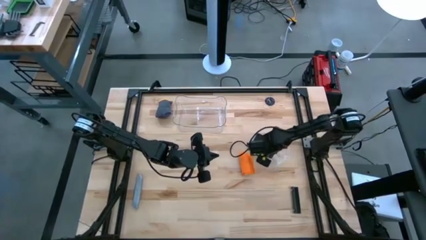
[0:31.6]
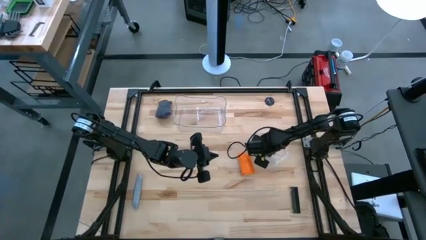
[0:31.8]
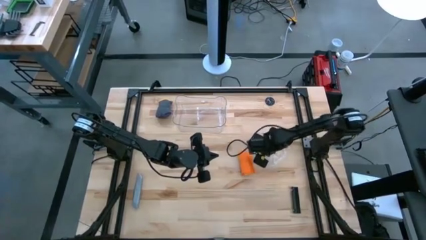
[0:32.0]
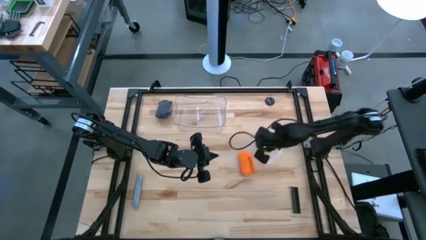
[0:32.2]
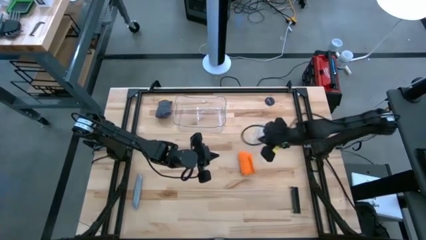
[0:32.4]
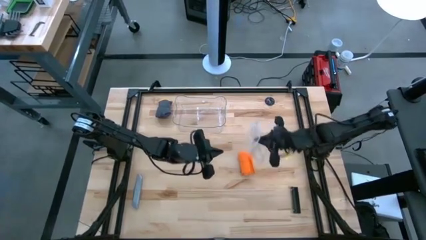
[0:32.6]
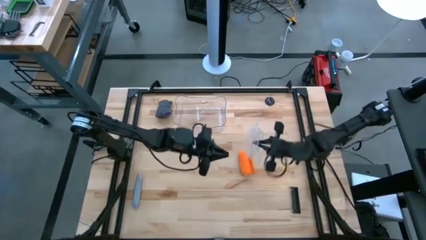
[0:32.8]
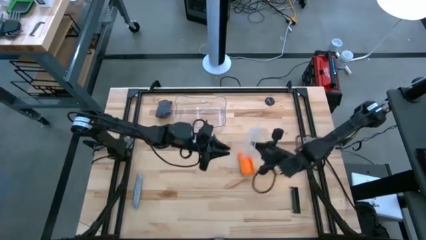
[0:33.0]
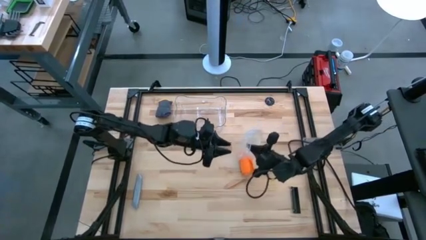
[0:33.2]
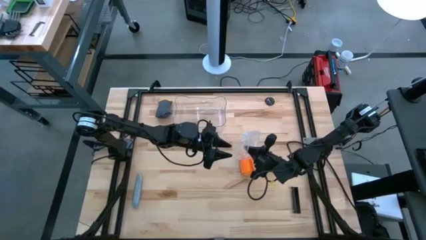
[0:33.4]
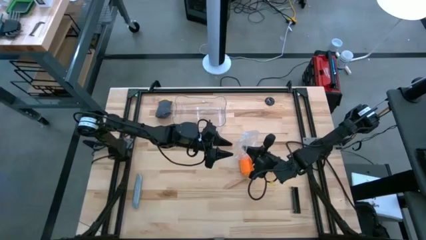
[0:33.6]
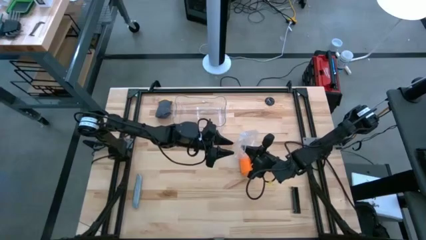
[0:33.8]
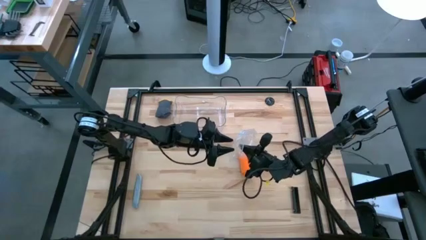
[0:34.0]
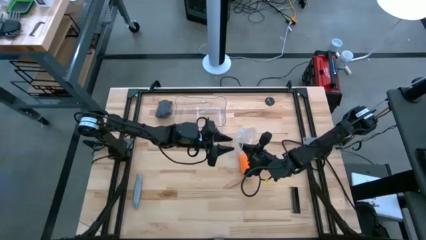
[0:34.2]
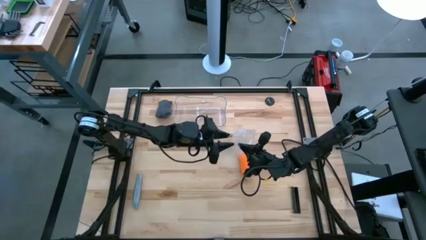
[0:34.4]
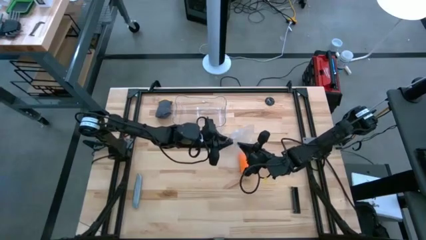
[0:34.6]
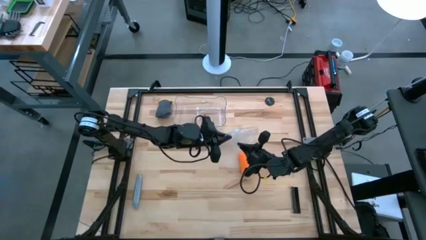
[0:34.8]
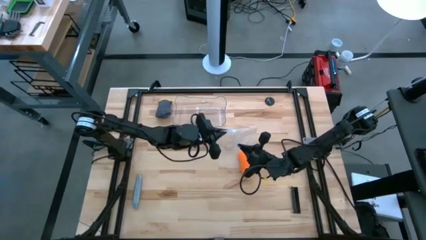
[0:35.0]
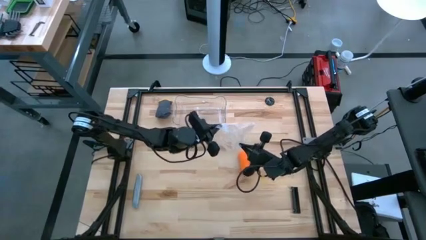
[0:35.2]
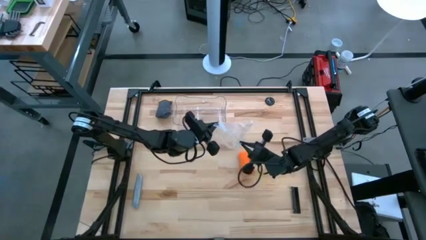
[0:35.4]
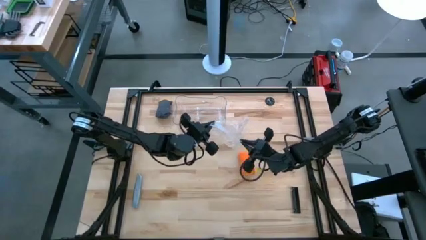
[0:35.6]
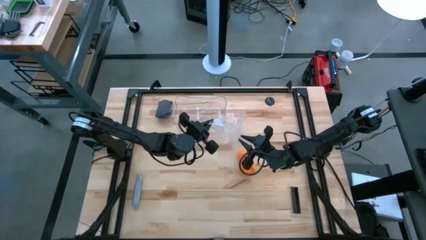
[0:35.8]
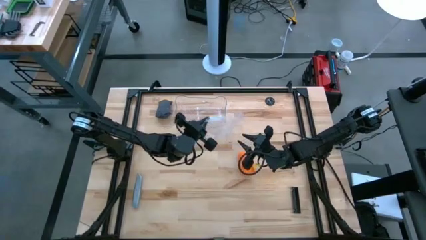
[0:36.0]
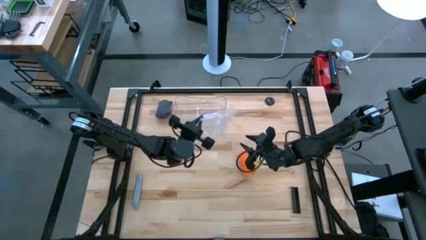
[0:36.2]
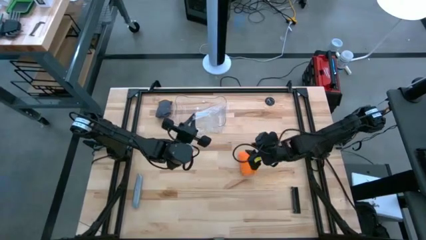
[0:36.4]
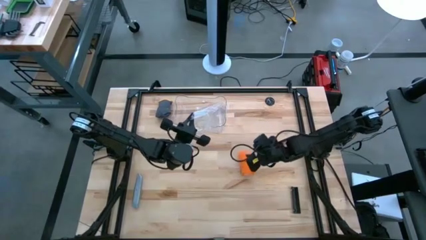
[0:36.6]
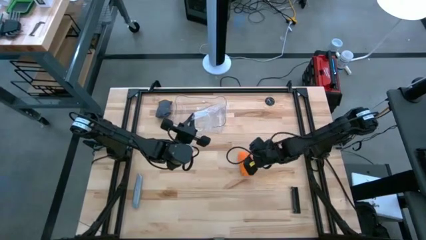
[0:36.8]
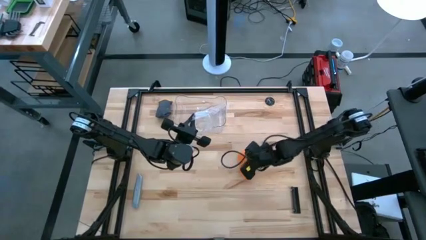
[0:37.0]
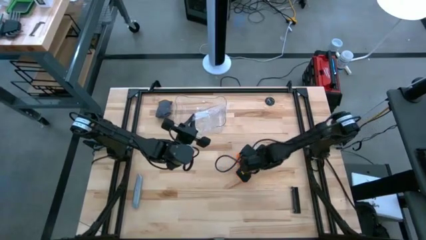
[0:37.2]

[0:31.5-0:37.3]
Task: Roll bandage
Put the orange bandage into the transparent zip bag

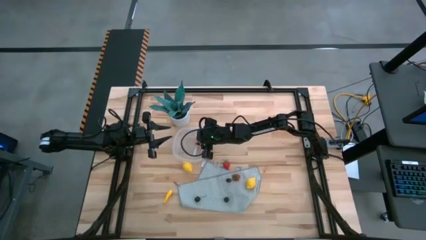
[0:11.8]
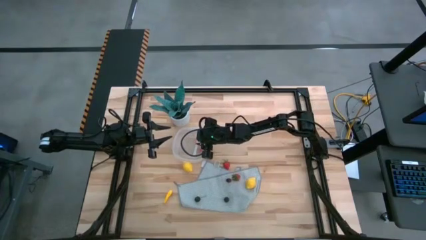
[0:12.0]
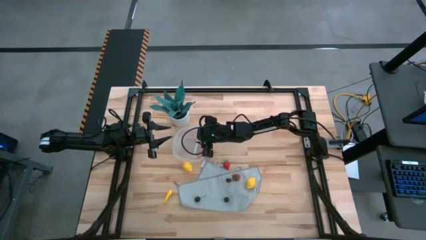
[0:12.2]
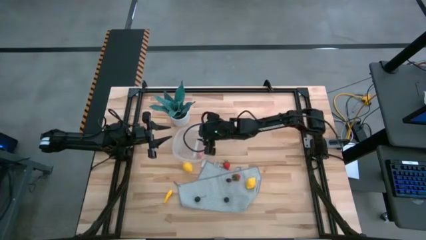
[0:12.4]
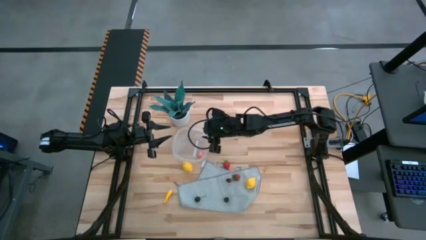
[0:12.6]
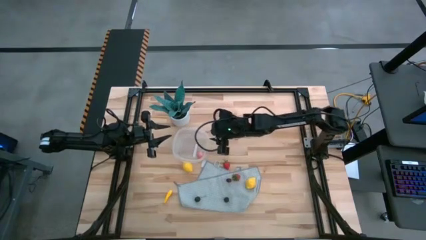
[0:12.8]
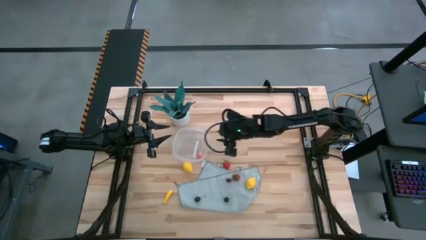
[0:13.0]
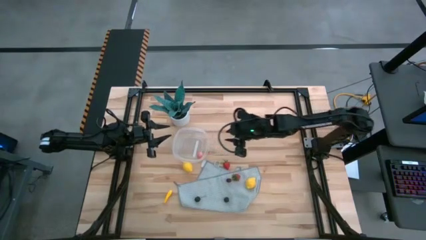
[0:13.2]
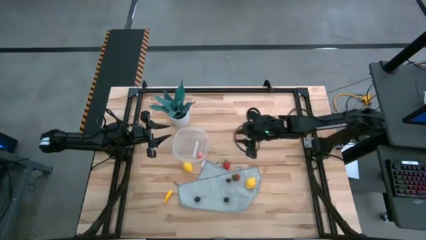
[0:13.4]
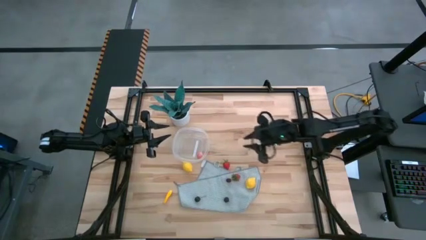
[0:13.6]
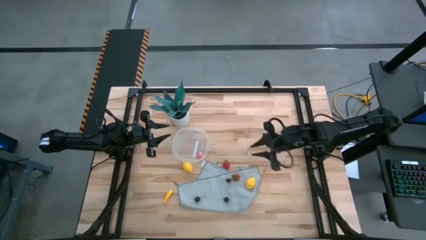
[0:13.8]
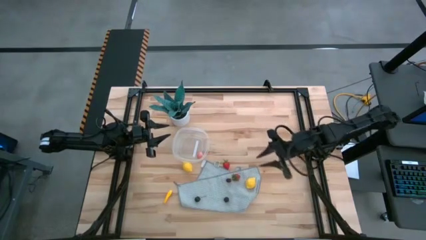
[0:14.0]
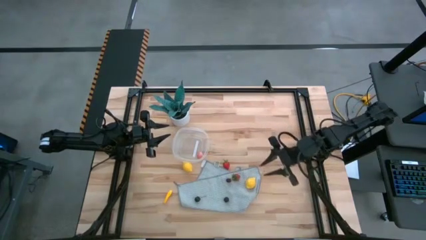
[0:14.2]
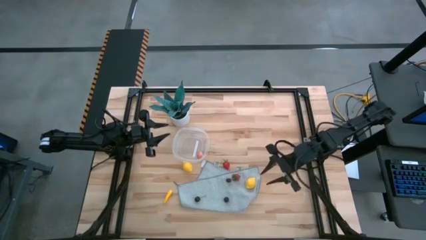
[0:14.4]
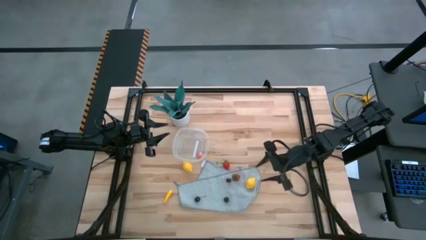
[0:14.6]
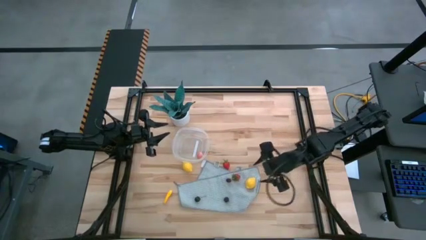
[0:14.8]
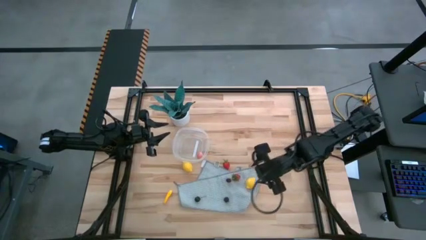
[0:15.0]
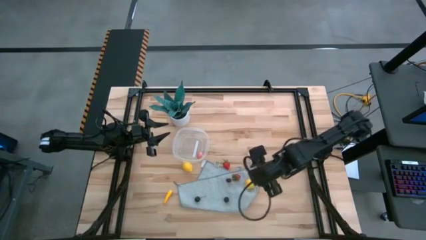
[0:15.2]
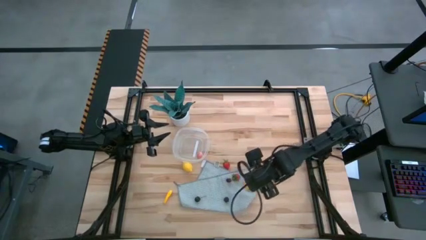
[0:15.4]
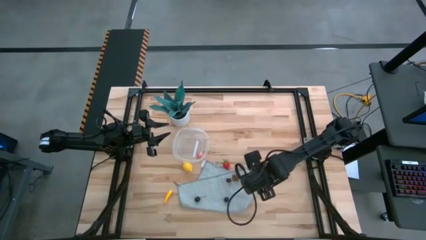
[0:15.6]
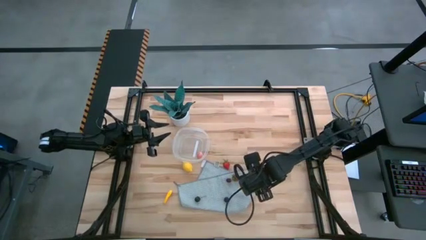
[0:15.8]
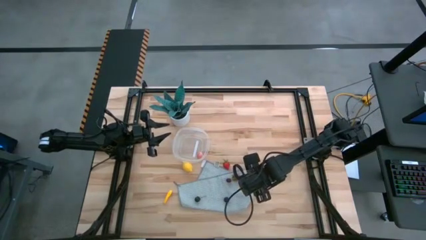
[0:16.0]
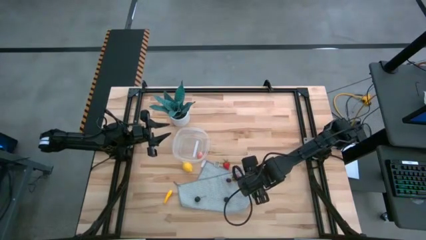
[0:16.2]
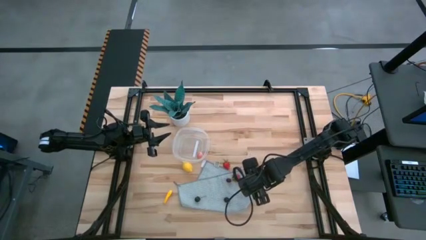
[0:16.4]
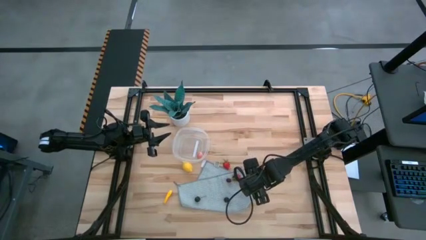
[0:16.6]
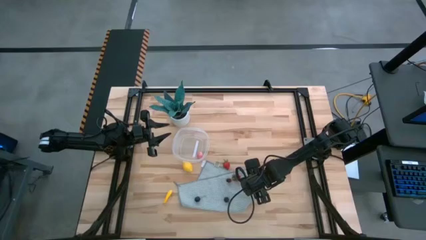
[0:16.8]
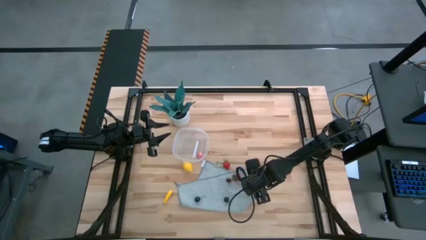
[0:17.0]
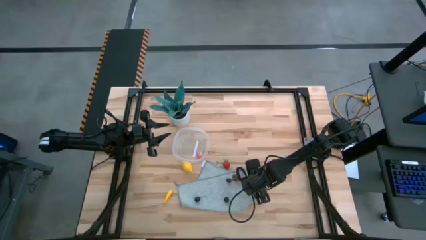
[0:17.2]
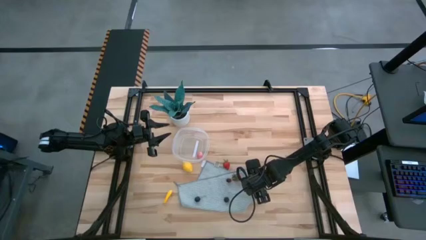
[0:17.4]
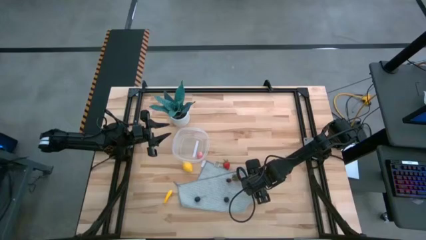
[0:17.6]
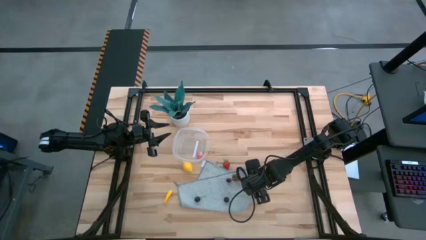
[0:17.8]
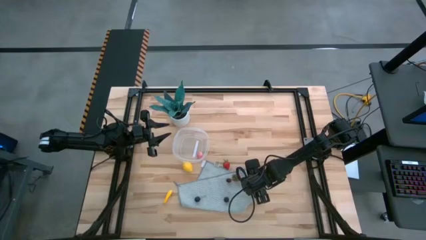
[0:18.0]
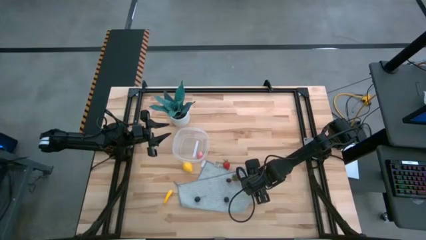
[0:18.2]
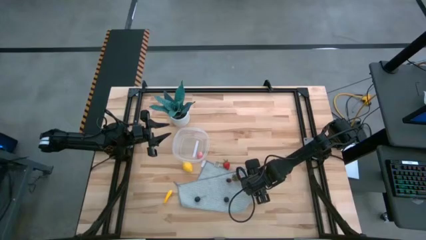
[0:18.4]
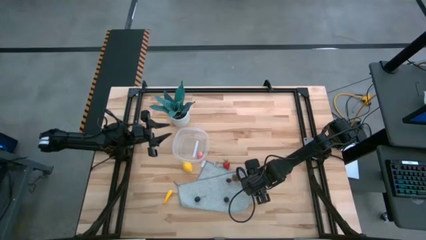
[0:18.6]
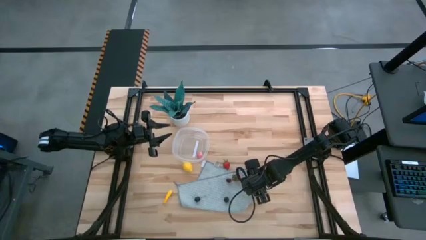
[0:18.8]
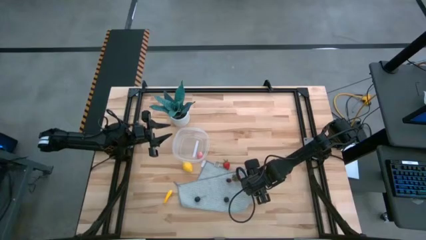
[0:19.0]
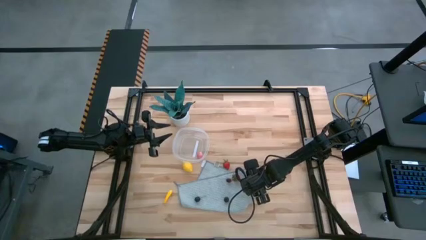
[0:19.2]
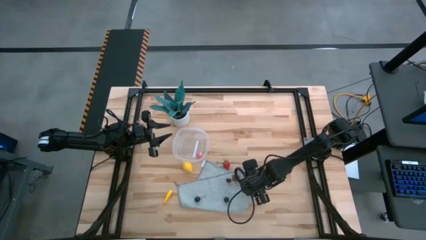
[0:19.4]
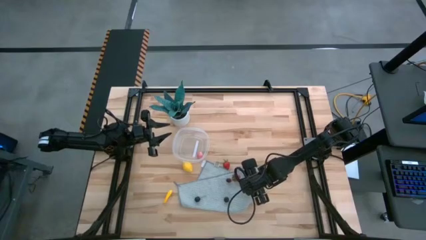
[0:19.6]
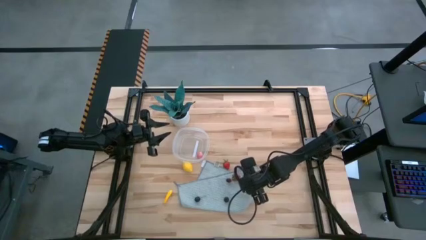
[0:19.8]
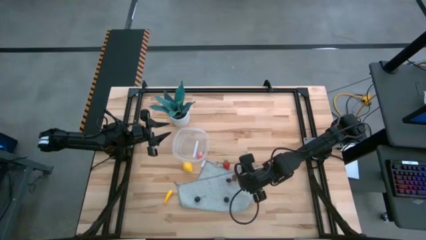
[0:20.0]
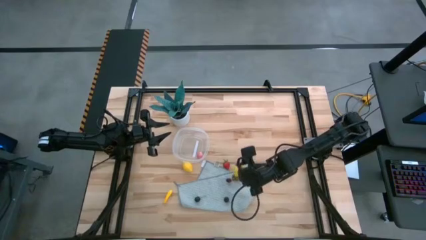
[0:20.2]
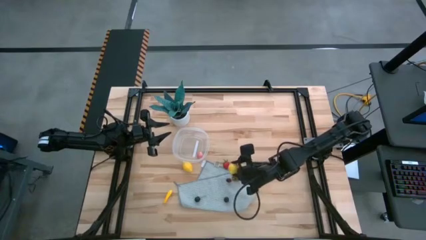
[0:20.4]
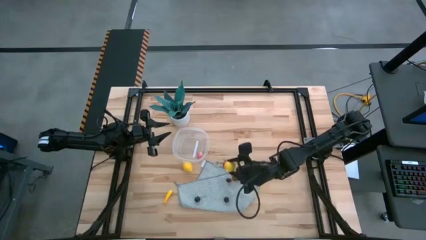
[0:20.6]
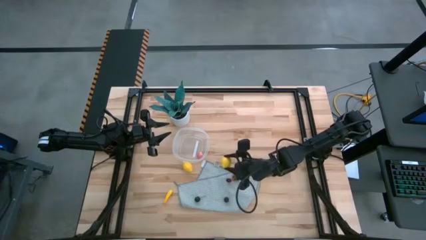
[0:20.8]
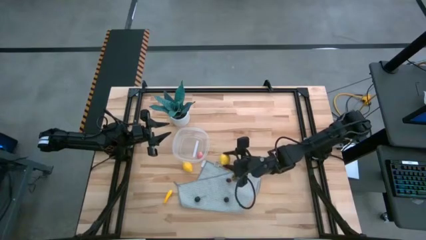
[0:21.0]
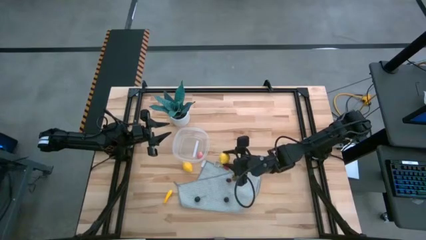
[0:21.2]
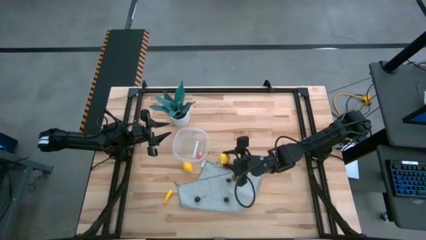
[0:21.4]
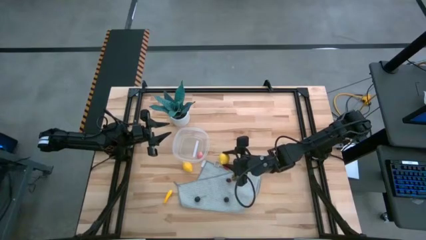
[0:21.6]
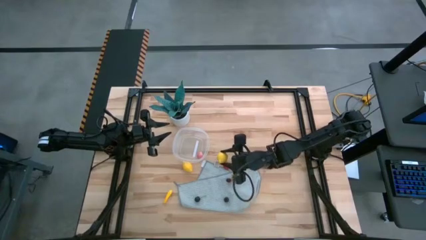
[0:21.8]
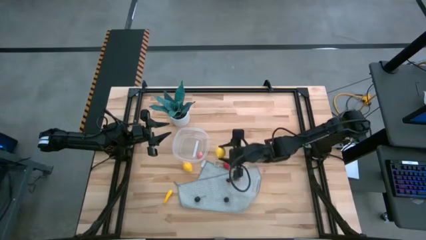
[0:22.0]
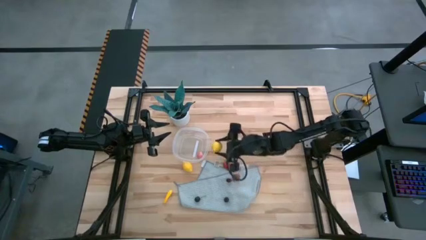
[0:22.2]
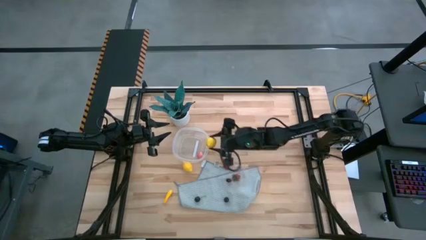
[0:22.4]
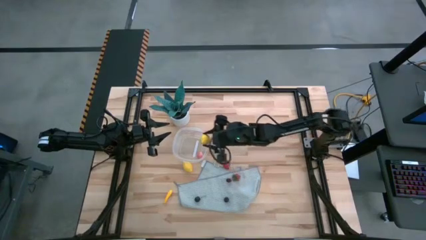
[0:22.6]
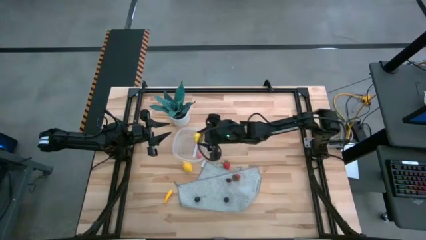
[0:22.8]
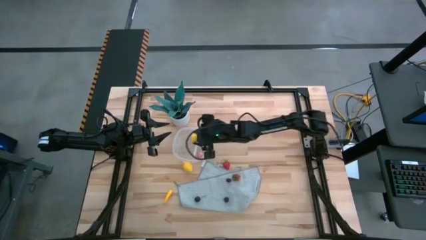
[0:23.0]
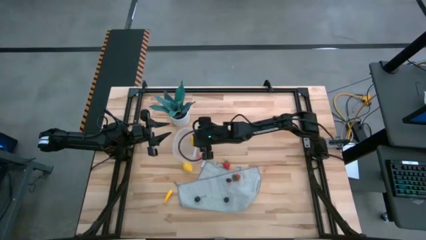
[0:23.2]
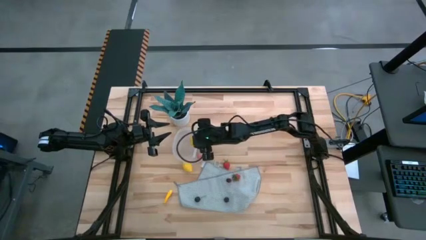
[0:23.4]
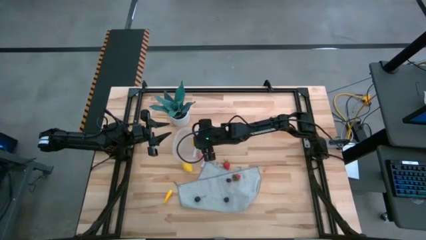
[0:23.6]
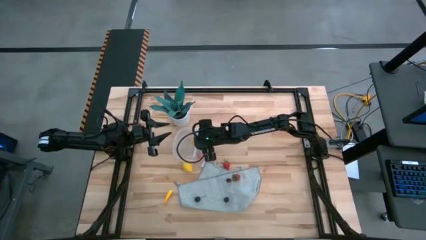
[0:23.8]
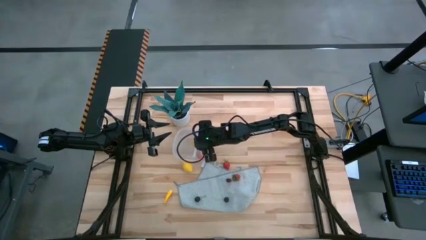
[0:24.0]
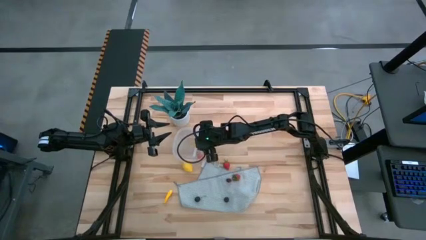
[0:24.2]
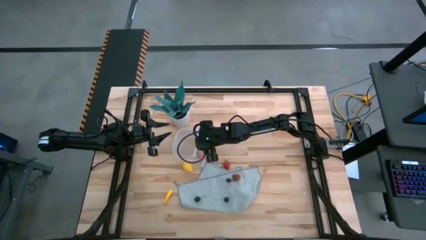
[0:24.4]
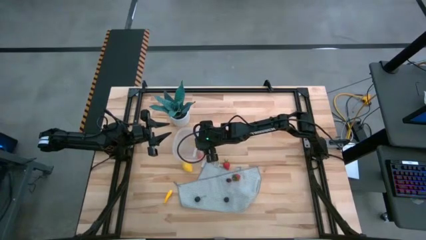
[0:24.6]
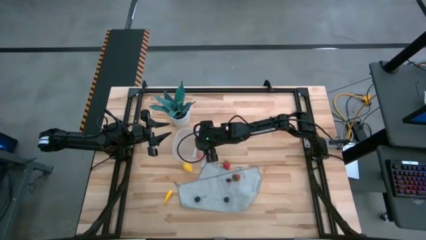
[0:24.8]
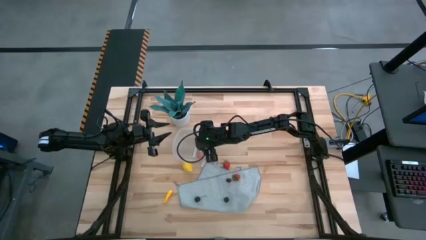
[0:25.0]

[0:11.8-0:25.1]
Task: Pick and placing Produce into tupperware
Put the right yellow lemon into the container
